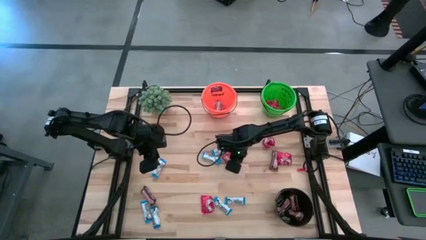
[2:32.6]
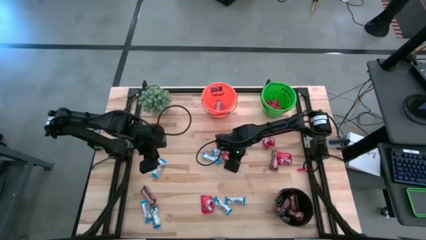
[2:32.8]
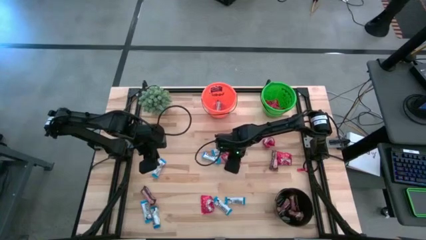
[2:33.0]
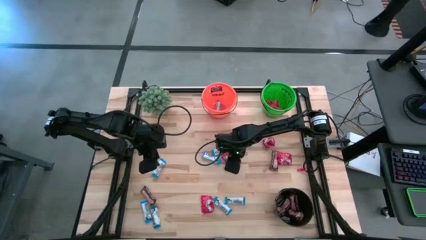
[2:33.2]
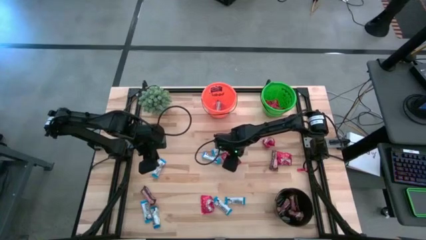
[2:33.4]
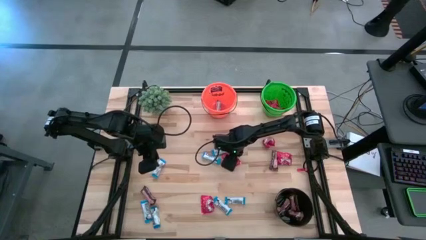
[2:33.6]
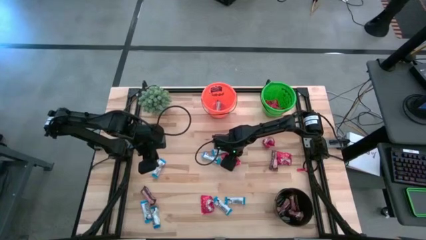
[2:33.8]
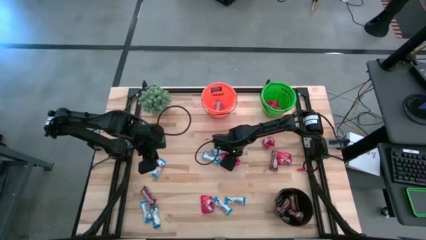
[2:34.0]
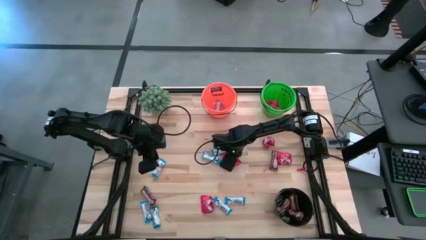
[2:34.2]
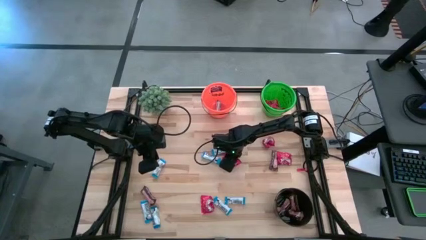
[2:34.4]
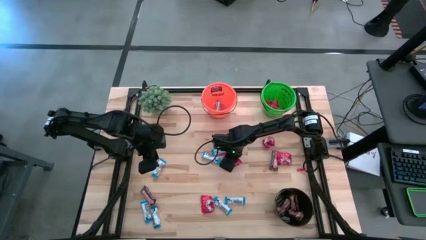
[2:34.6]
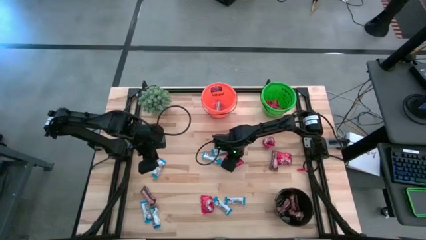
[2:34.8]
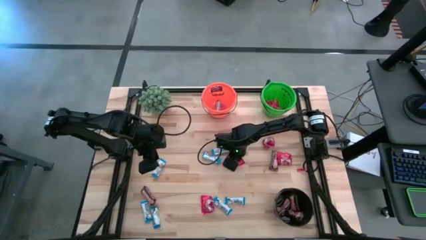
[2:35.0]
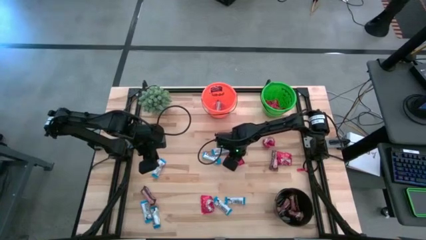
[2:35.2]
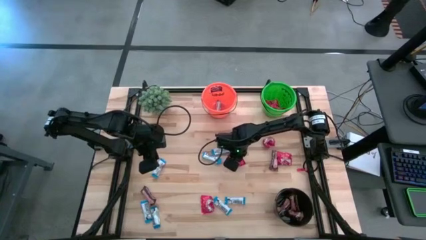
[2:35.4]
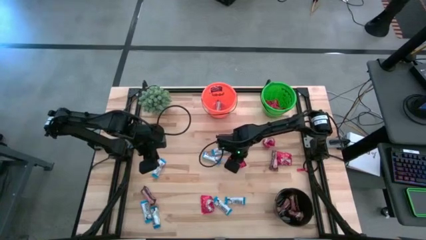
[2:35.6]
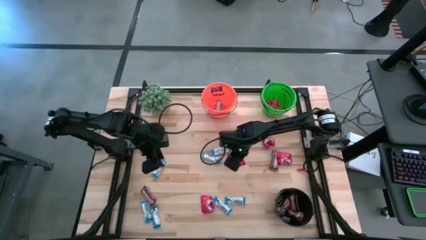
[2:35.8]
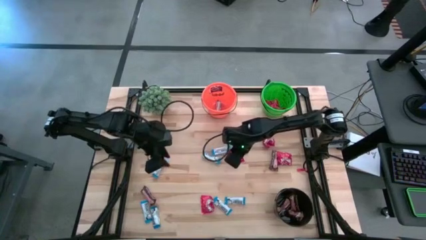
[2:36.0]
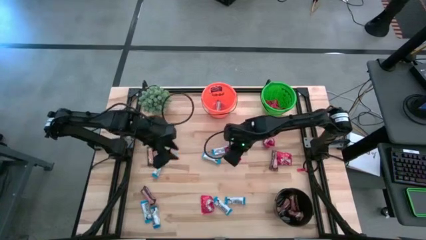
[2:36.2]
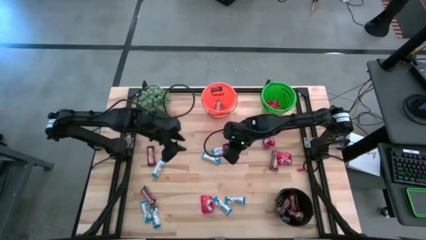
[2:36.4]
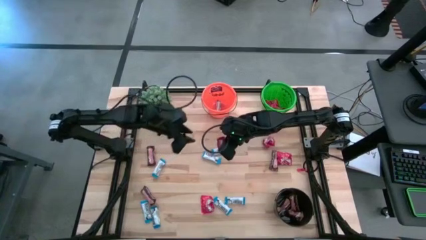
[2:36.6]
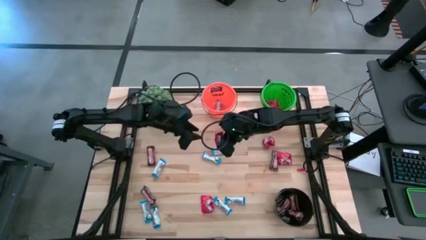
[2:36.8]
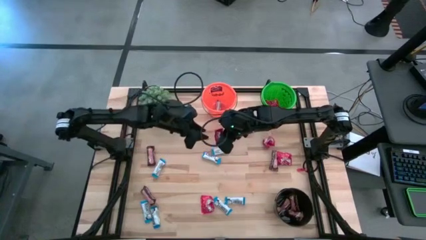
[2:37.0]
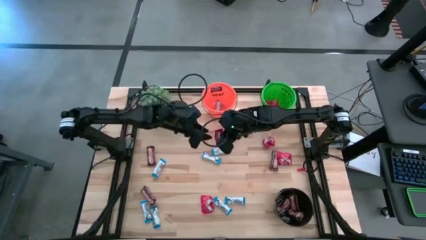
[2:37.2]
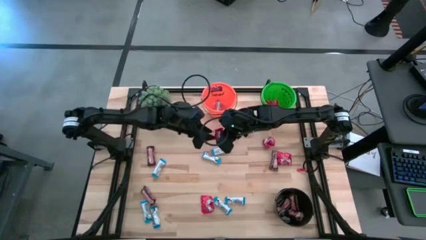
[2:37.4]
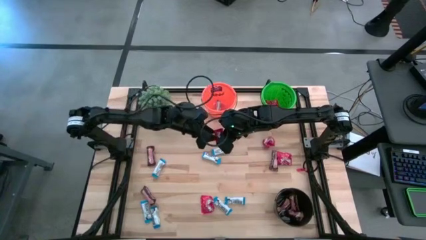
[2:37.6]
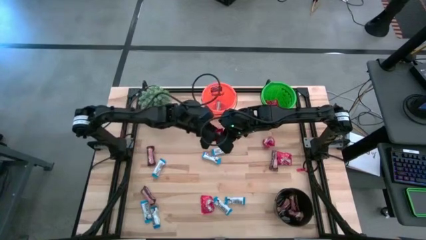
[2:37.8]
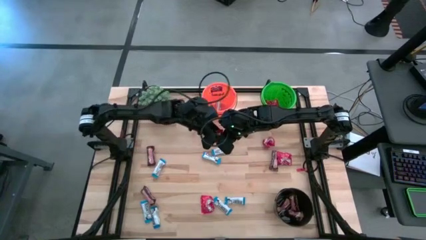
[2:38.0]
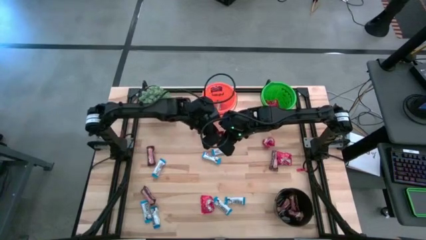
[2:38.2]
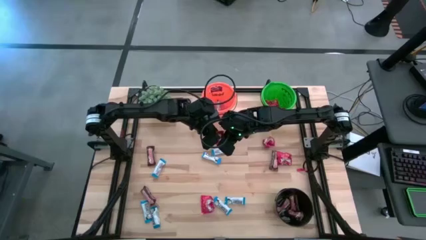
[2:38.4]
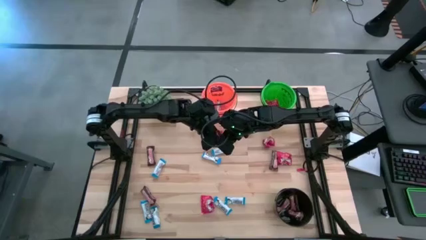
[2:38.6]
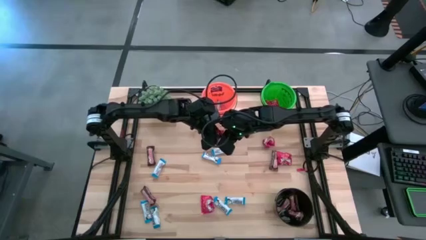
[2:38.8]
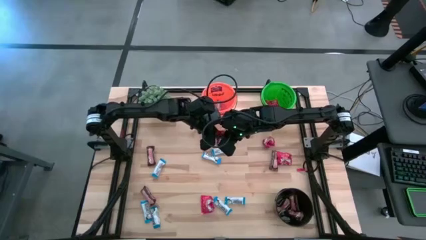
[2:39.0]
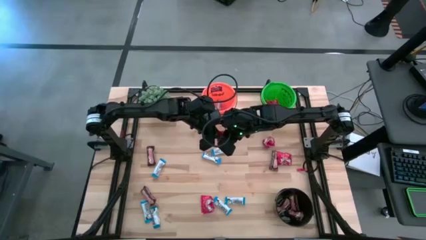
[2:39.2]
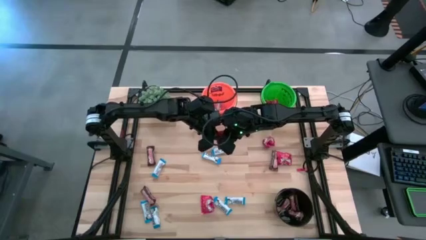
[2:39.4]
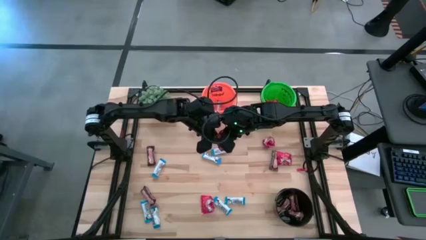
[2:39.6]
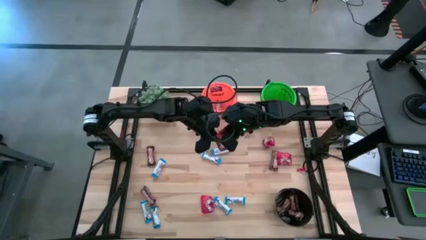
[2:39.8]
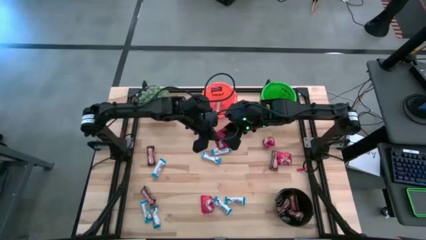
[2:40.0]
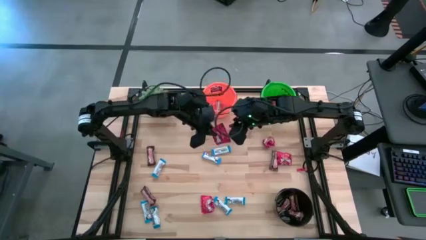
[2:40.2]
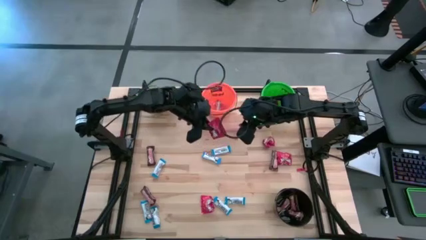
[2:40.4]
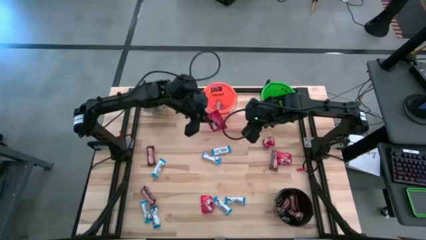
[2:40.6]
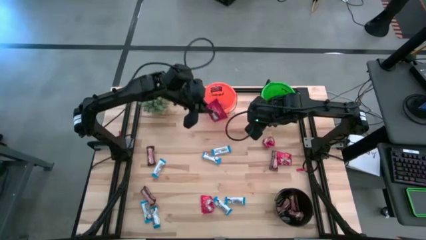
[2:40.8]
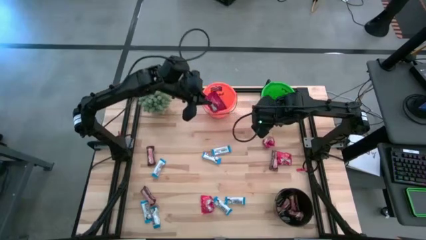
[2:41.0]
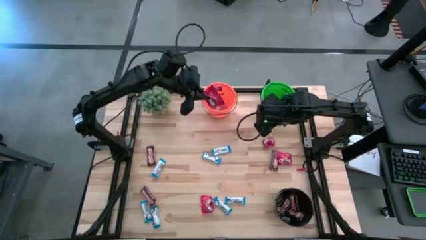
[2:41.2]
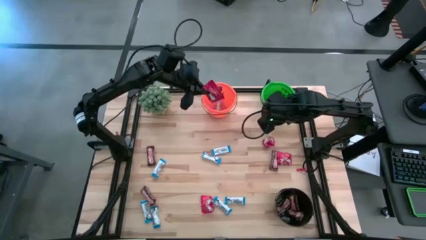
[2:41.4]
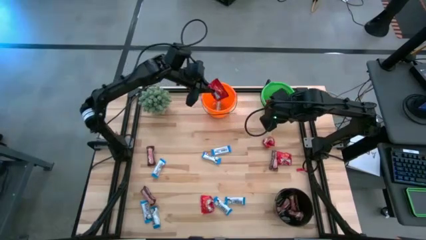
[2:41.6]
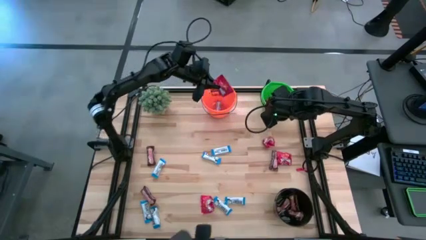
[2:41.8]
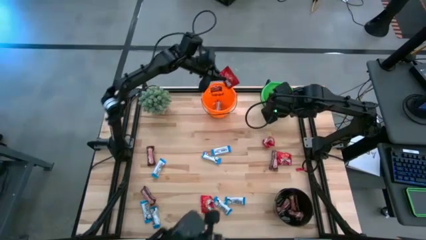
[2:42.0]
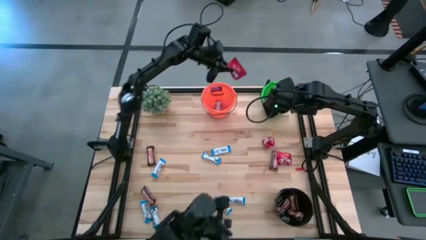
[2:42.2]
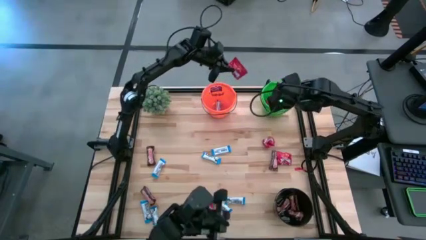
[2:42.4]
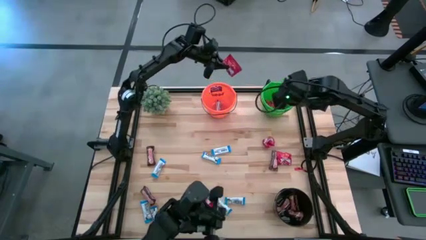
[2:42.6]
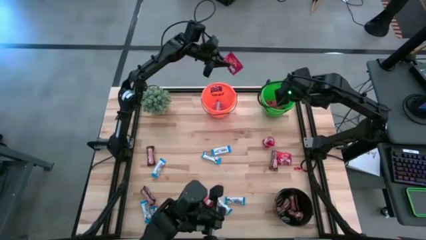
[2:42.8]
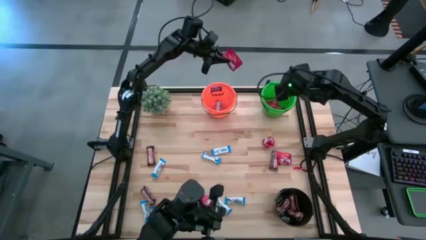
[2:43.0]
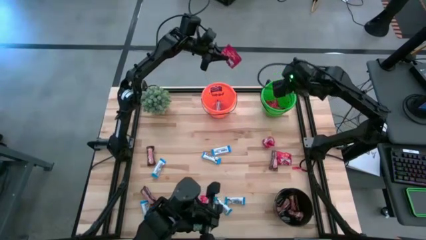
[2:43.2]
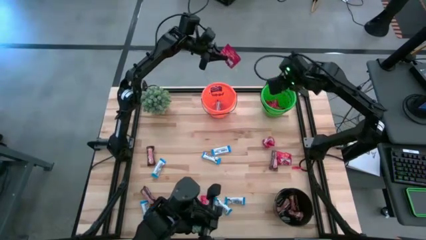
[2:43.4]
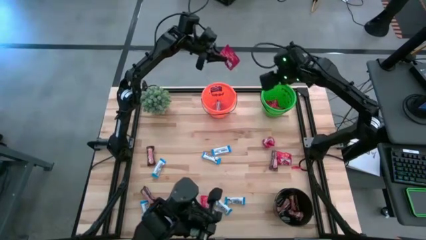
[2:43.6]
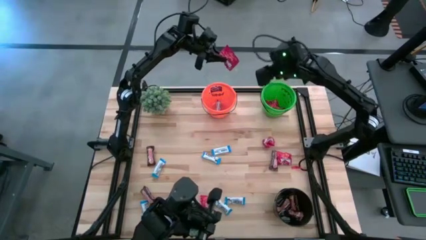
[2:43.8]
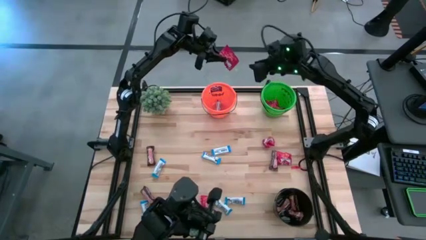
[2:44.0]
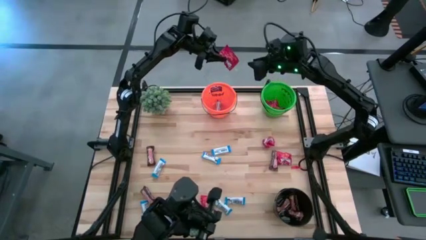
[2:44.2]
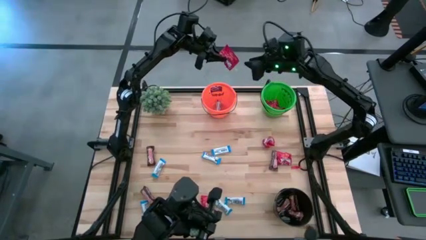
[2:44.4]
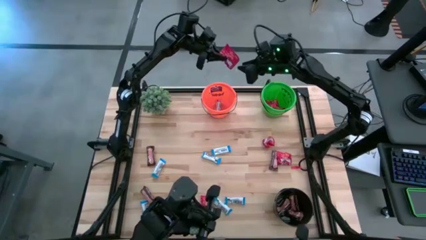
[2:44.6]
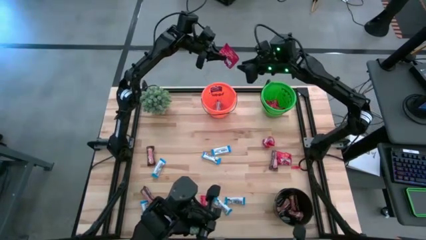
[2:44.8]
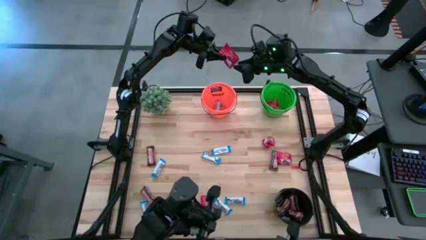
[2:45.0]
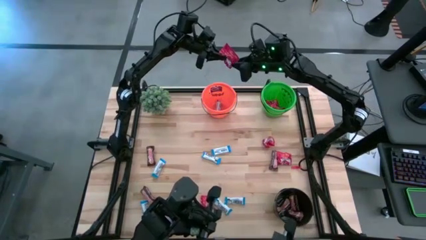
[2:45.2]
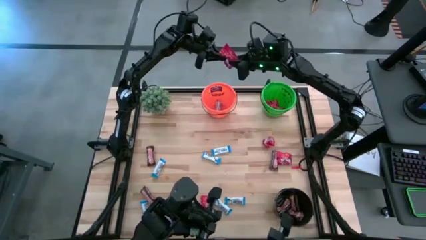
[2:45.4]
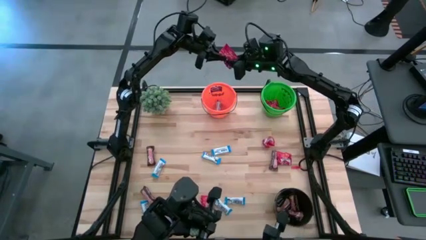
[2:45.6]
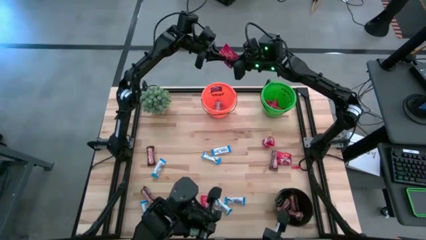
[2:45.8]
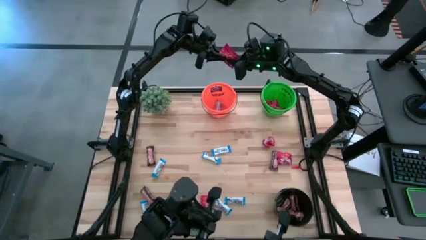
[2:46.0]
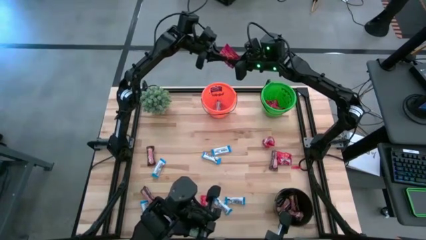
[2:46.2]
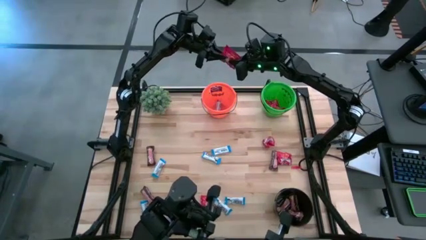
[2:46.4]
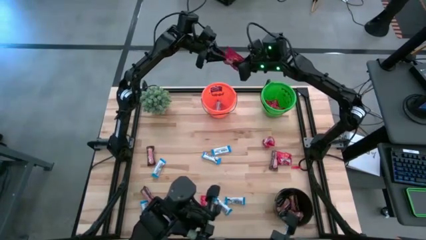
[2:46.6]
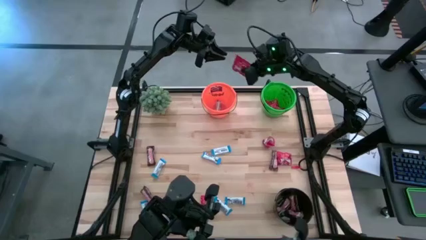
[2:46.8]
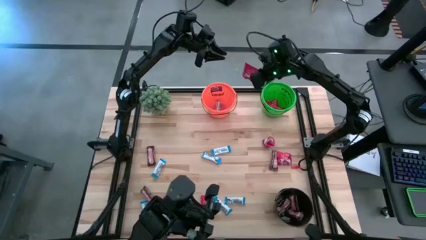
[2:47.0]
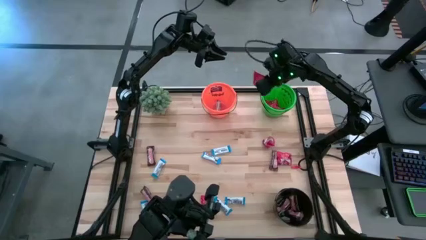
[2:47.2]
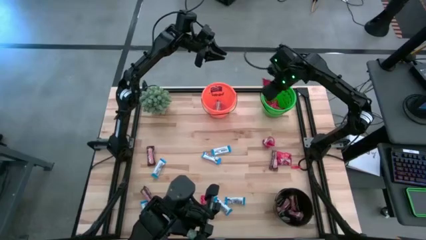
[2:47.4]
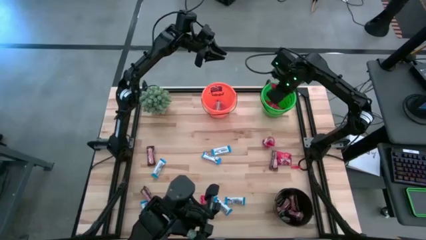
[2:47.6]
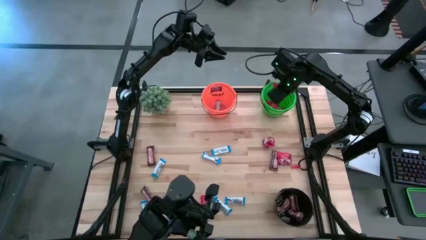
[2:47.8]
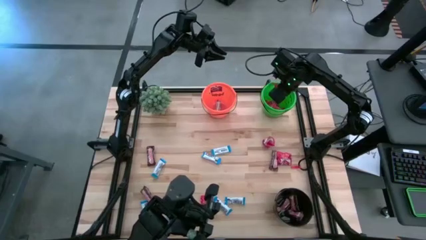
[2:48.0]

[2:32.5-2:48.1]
Task: Organize candy in baskets
Put the red candy into the green bucket
